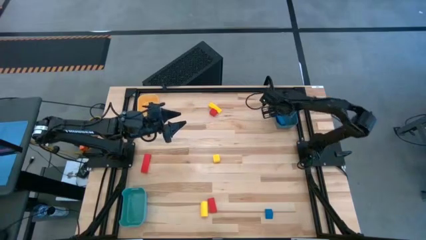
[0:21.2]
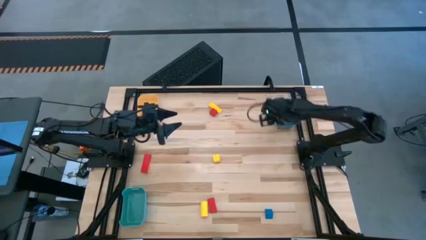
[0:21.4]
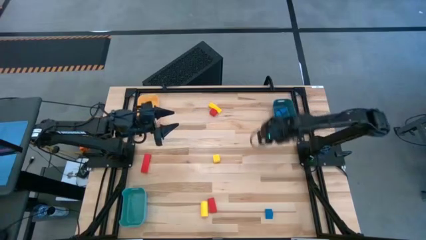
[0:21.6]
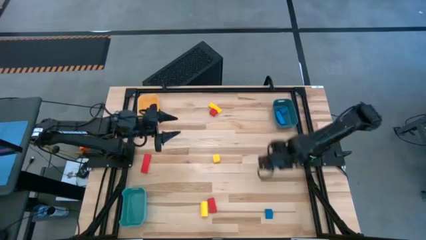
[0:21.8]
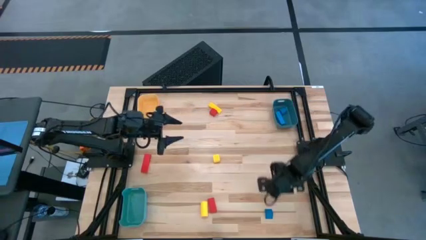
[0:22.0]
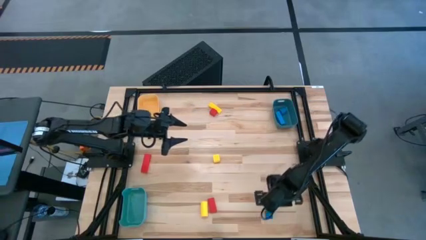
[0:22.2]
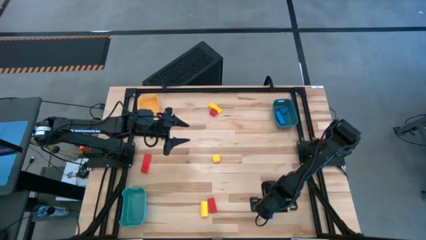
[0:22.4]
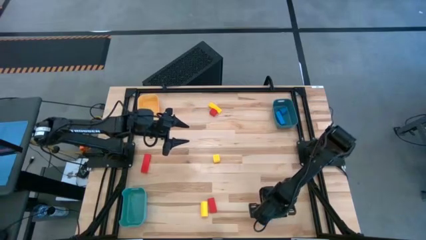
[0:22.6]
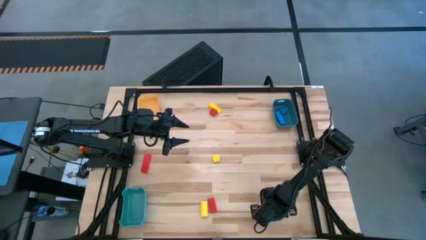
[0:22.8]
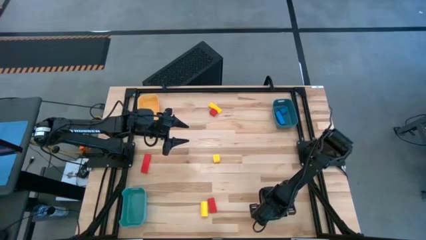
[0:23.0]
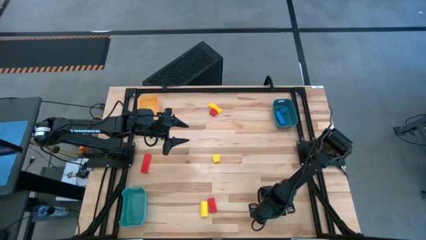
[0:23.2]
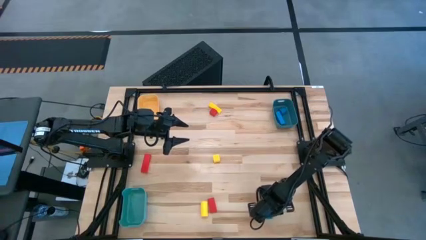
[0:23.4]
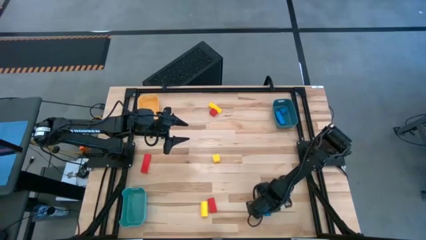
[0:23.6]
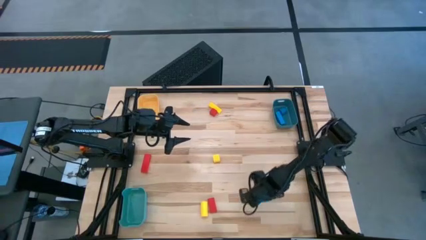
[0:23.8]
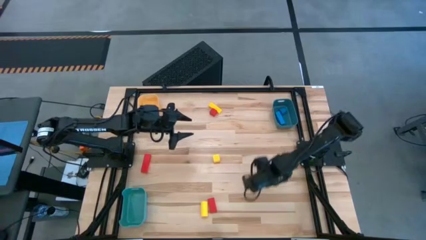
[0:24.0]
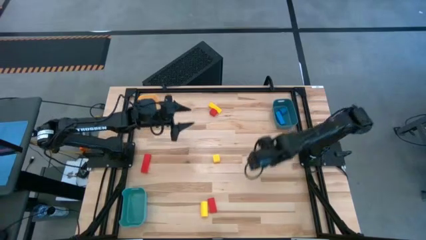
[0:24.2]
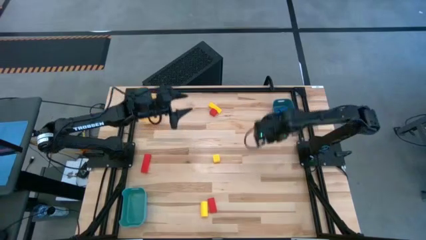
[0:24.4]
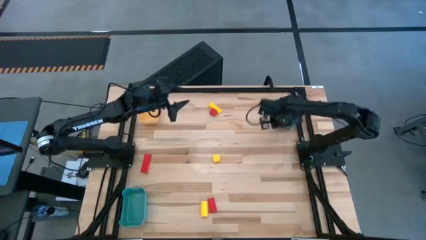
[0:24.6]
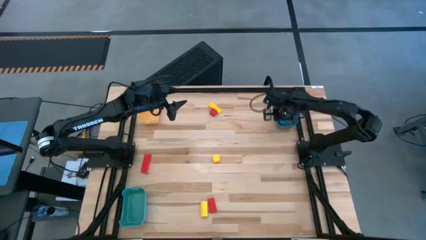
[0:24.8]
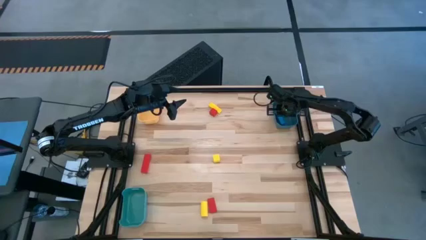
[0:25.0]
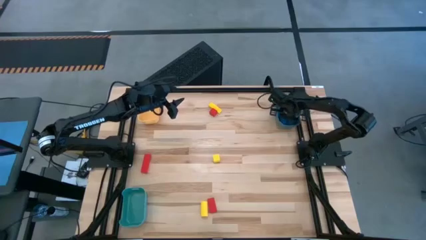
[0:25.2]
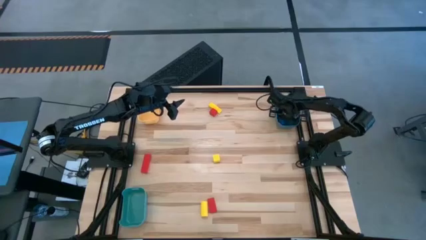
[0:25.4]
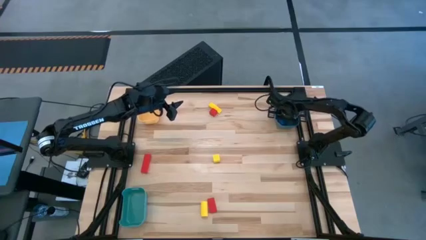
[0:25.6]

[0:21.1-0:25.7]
Task: Sort & place blocks by color
Put the blue block into the blue bin

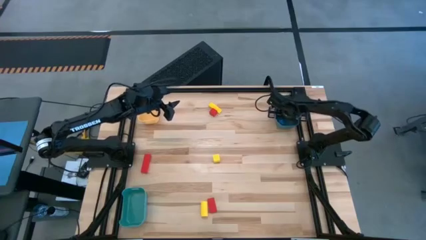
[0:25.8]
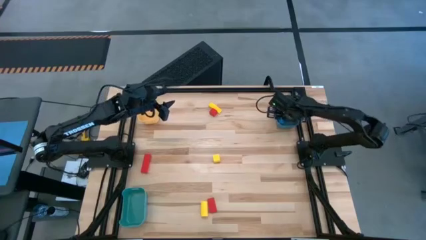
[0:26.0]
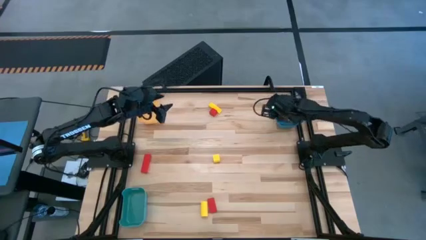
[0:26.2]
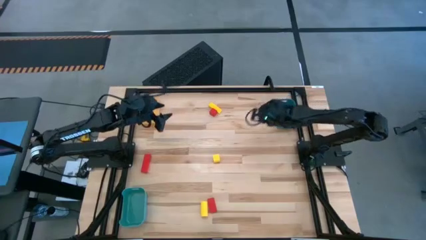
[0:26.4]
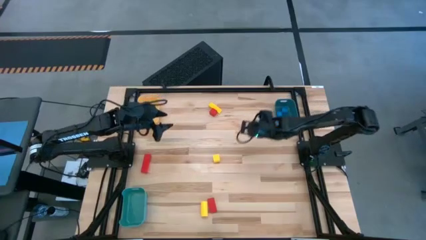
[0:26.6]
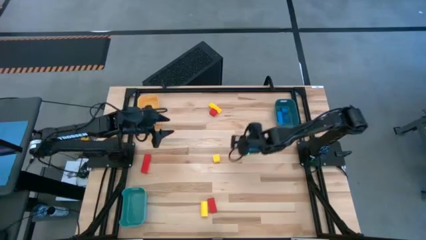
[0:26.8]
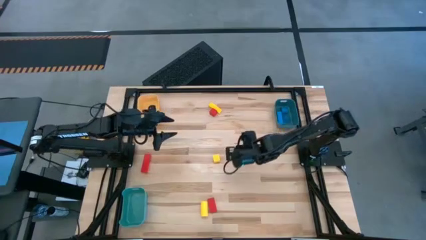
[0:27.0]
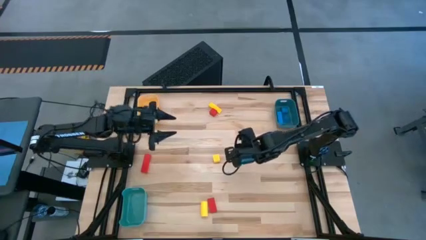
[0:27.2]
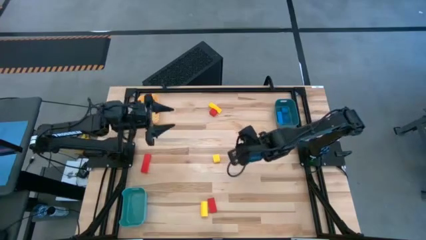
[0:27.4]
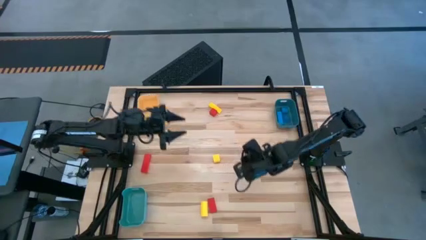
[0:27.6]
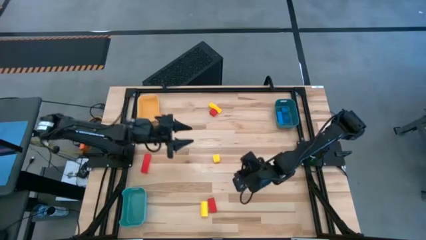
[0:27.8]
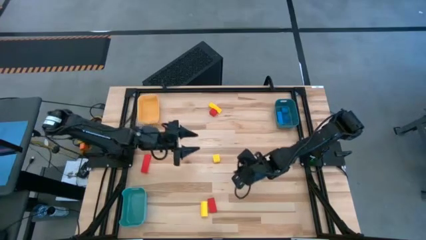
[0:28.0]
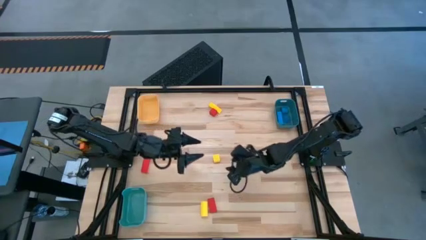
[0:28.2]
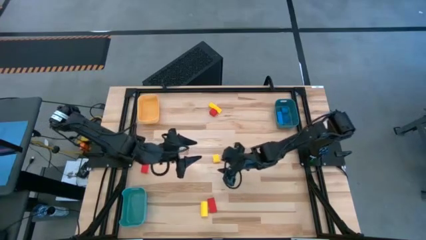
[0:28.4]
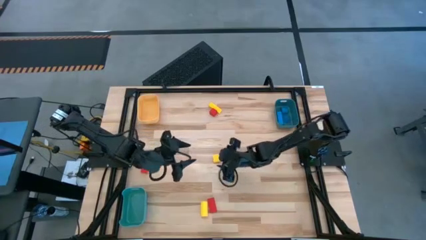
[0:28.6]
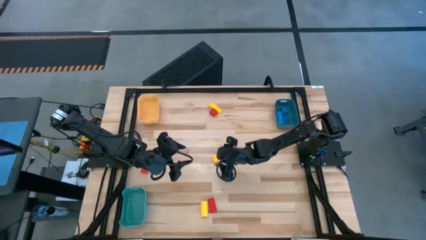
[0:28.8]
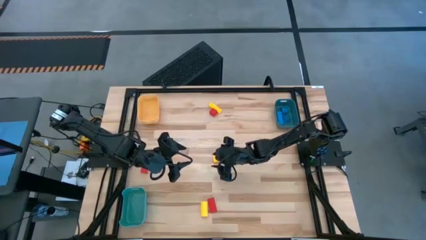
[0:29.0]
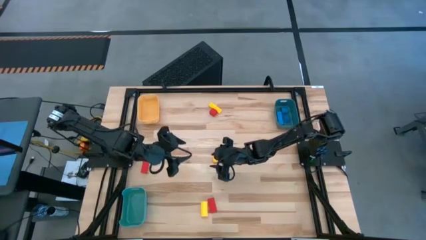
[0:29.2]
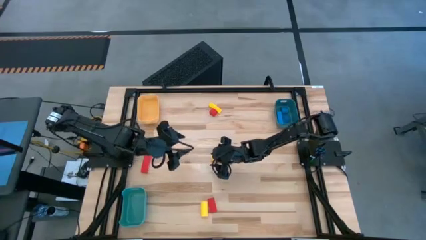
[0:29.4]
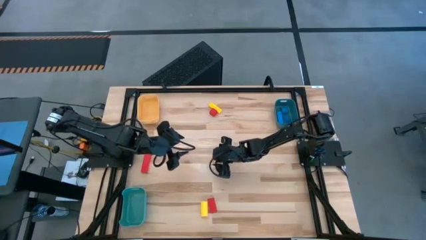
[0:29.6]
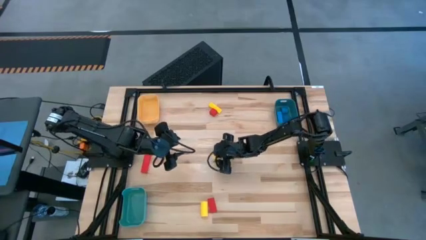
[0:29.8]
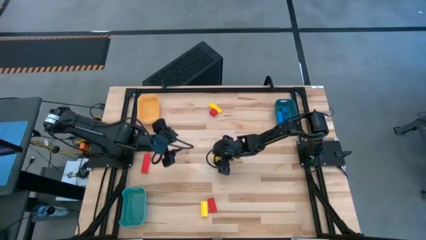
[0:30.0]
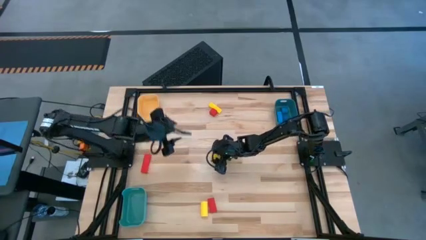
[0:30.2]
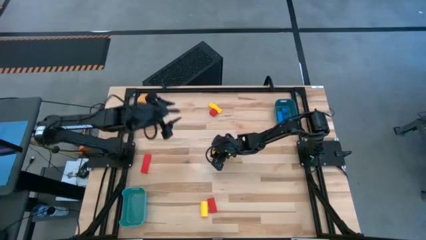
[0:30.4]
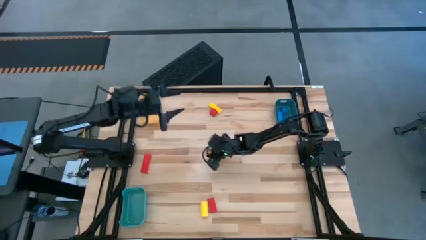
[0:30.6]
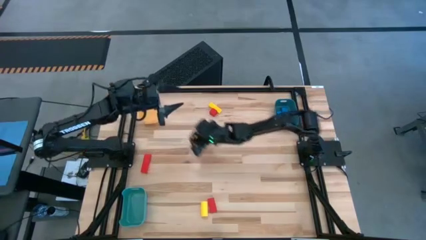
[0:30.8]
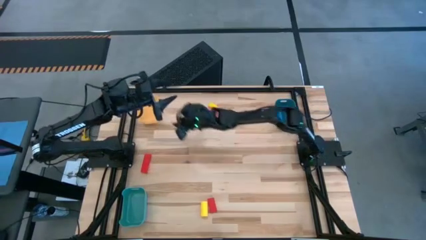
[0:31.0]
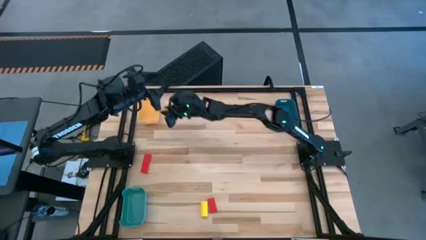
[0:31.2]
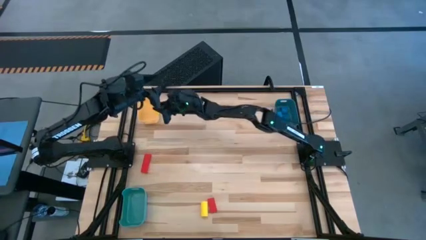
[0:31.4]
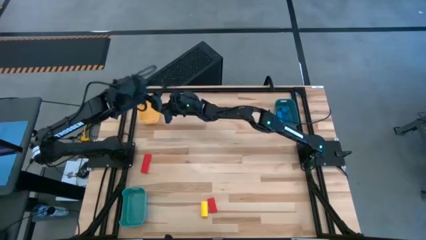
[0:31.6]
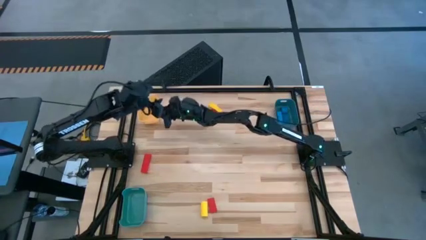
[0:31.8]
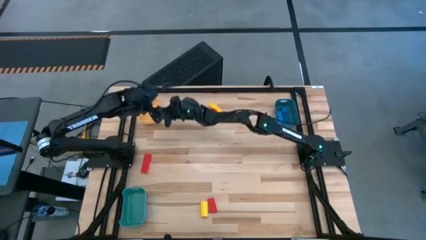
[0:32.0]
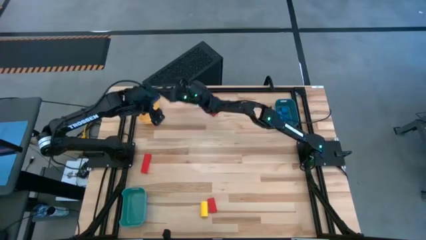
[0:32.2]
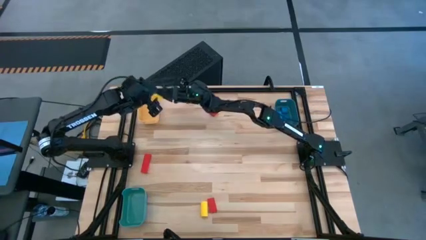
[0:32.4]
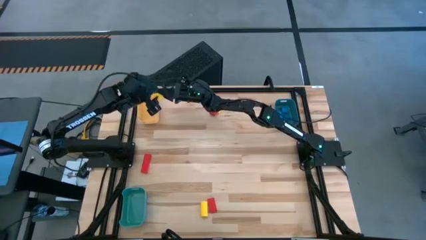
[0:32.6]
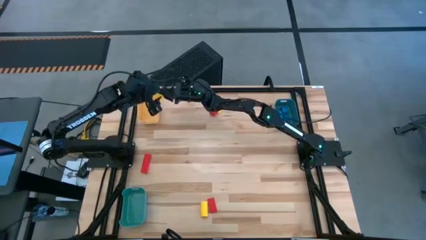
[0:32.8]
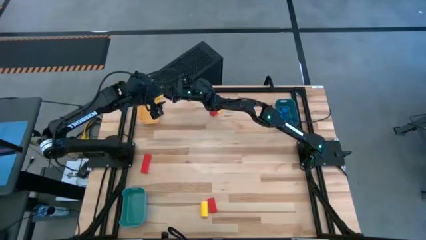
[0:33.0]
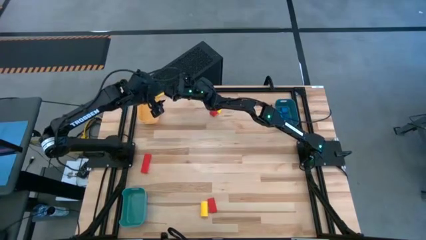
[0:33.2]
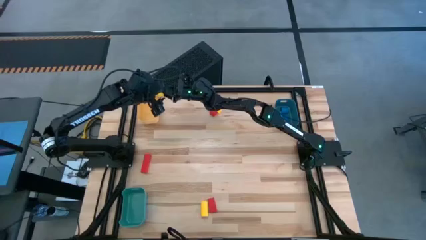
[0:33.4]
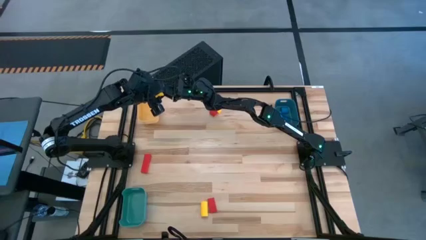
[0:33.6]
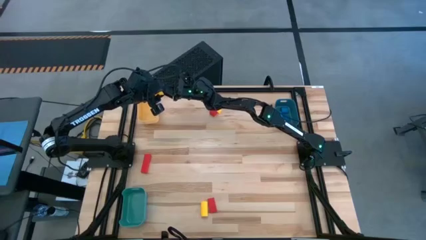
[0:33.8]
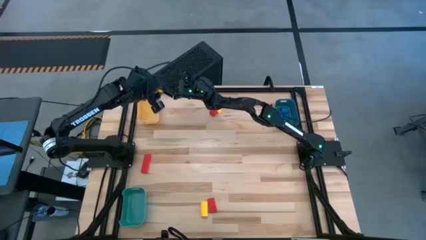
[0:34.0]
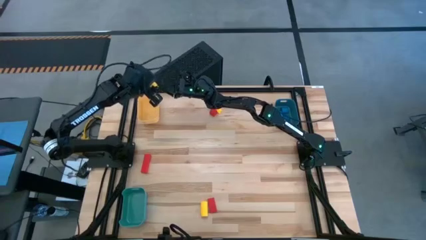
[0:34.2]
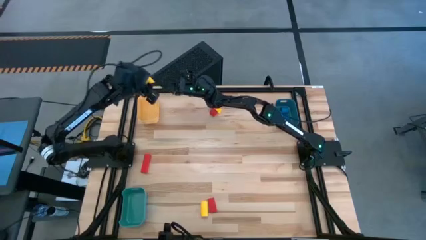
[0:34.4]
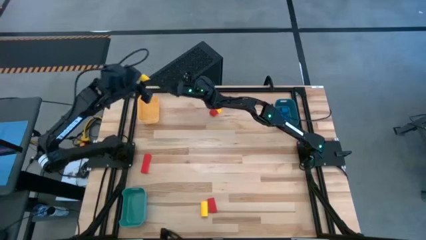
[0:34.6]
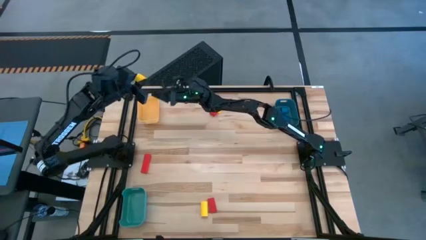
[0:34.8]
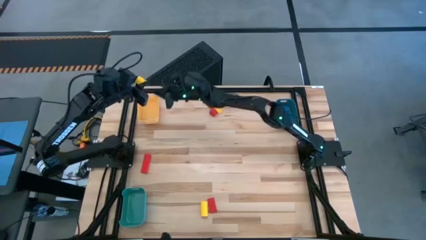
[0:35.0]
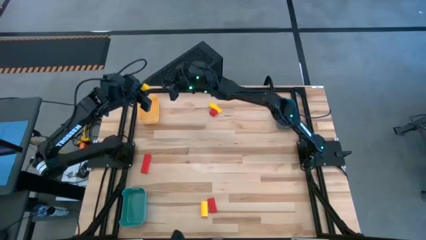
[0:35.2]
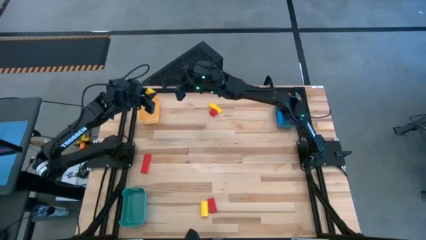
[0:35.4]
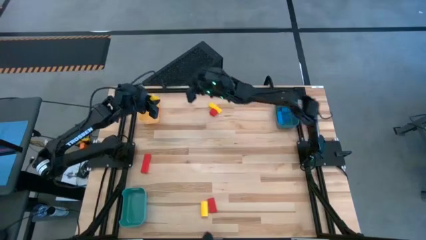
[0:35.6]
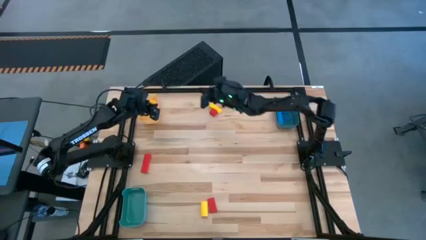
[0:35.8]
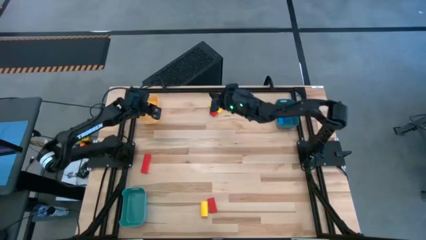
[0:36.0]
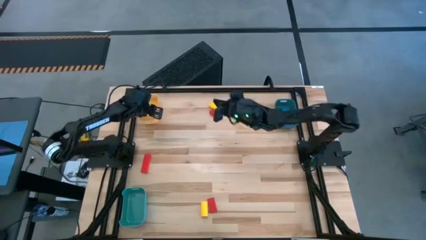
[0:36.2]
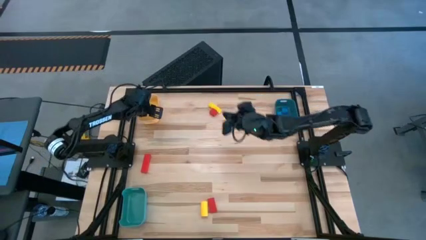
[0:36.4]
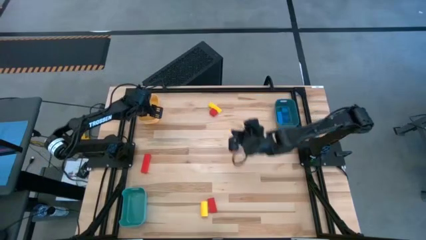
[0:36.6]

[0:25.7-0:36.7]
Put the center yellow block into the yellow bin

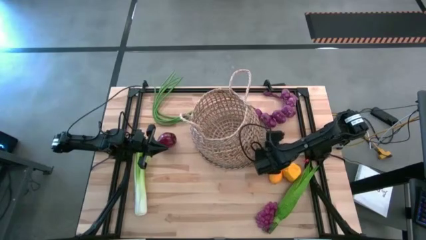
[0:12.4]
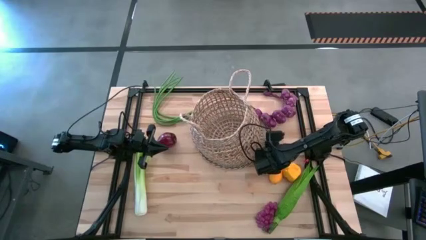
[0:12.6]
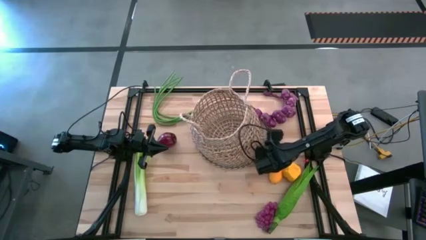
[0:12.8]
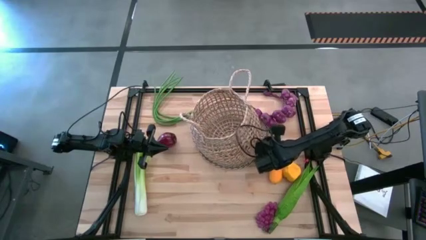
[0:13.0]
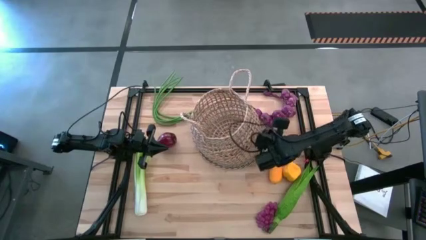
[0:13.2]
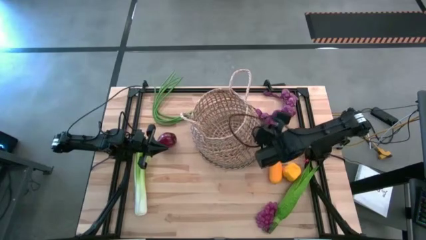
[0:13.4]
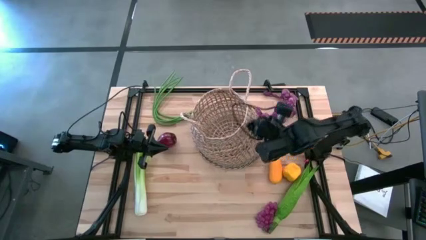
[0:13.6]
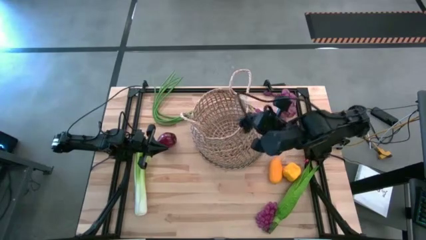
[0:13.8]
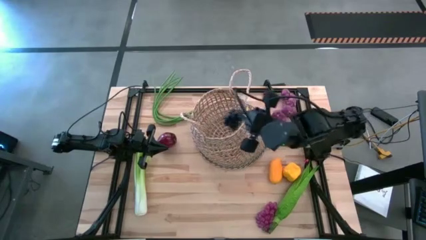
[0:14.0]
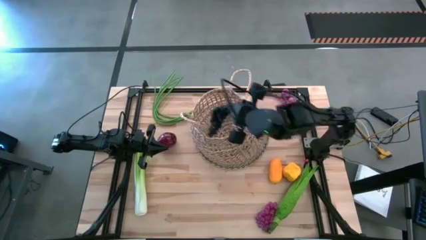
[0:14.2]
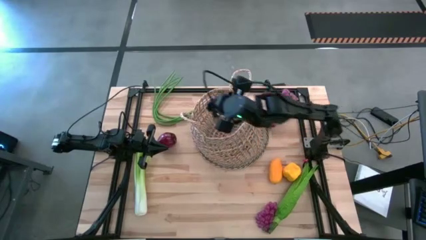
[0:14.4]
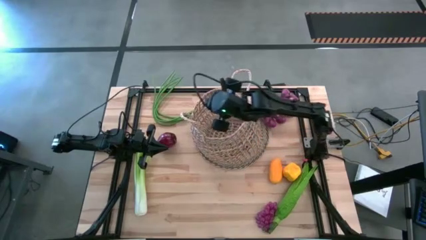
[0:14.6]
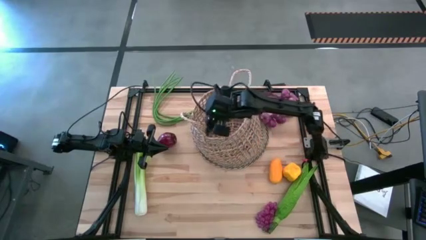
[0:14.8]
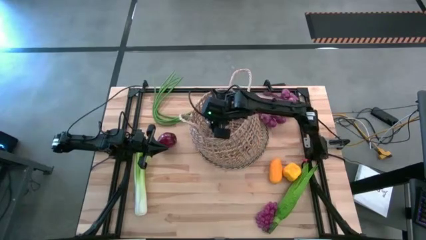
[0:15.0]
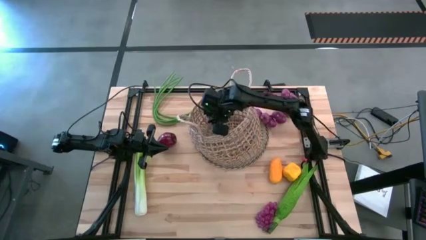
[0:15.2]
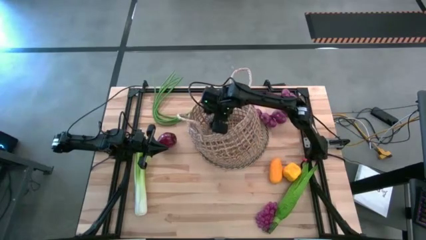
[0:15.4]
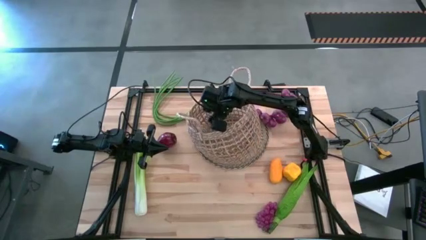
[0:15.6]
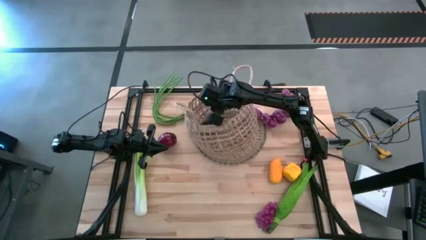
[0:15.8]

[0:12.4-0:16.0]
Task: Build produce basket
Put the dark purple grapes into the light brown basket
